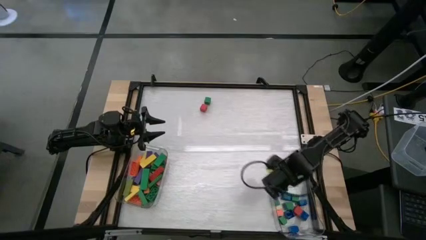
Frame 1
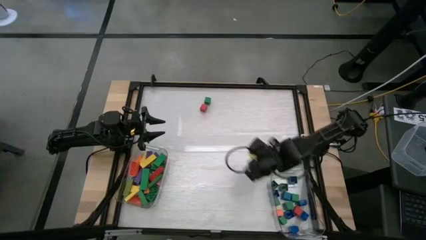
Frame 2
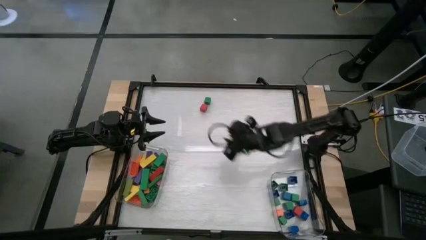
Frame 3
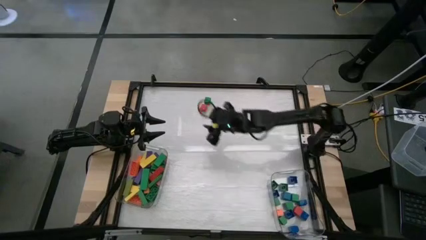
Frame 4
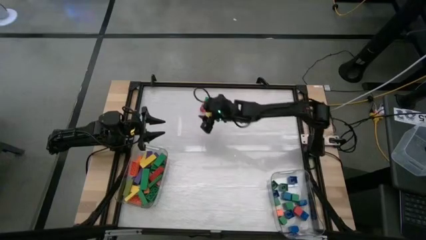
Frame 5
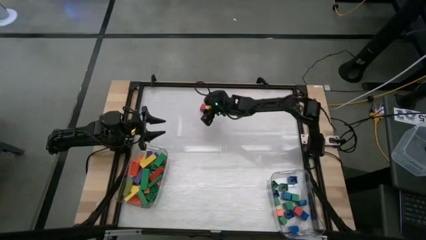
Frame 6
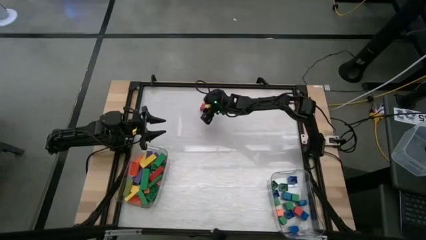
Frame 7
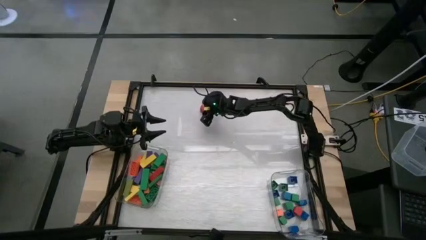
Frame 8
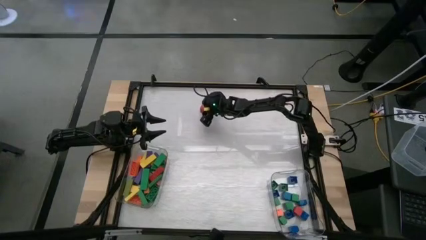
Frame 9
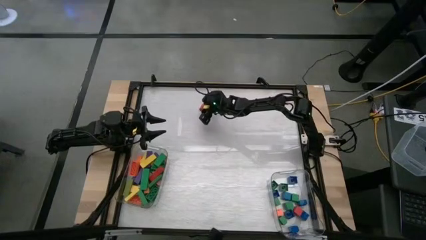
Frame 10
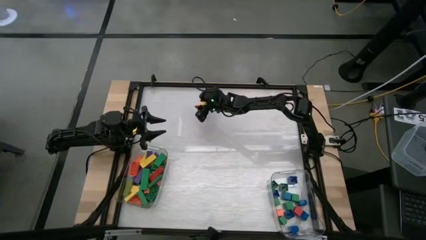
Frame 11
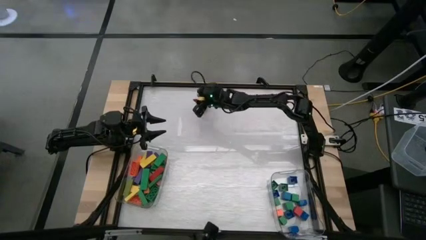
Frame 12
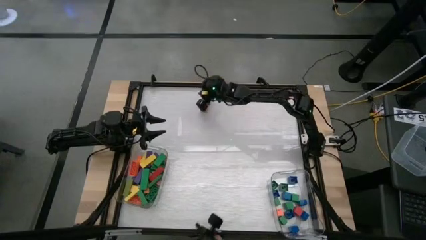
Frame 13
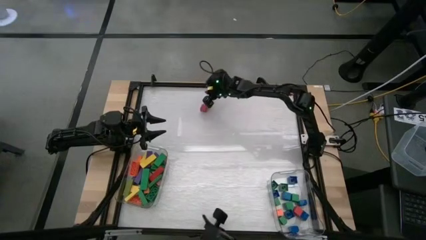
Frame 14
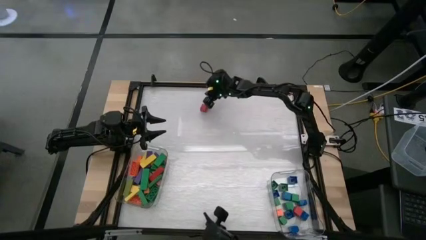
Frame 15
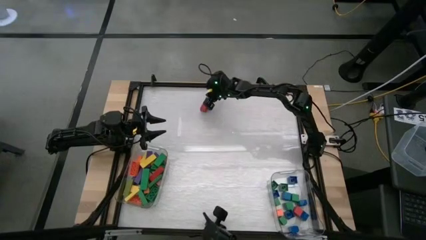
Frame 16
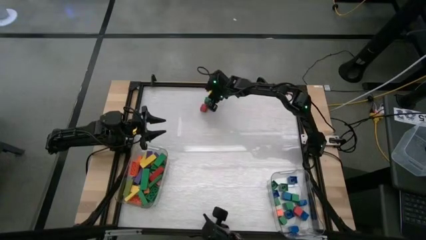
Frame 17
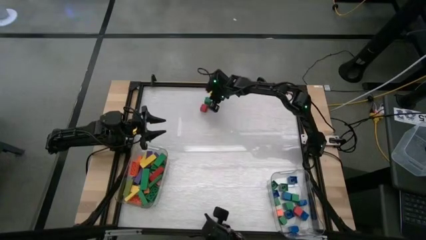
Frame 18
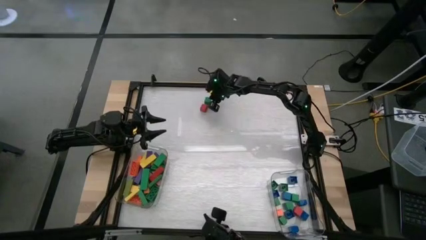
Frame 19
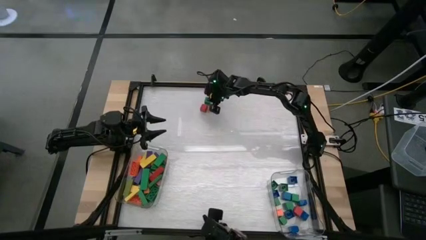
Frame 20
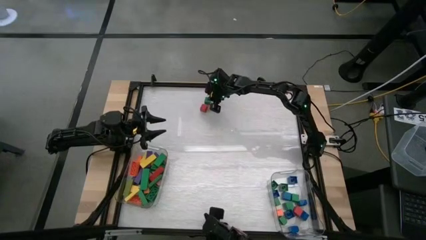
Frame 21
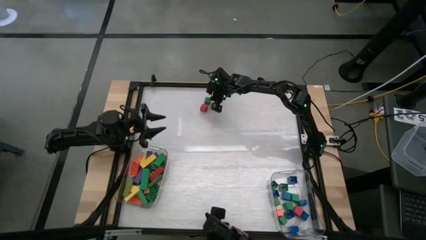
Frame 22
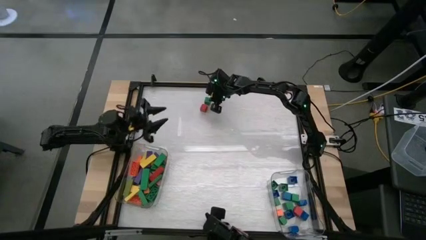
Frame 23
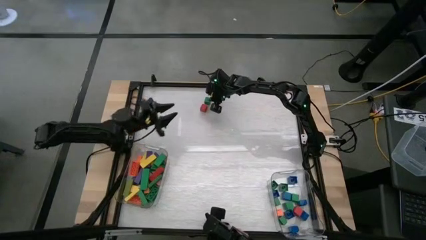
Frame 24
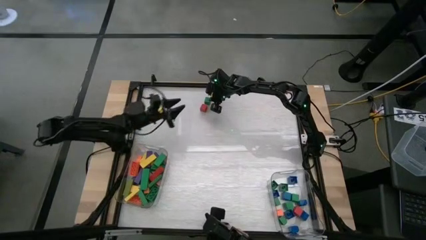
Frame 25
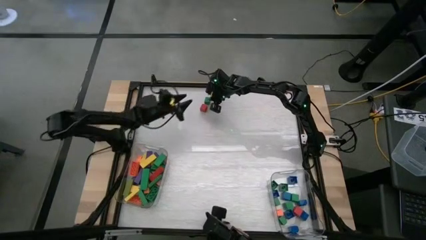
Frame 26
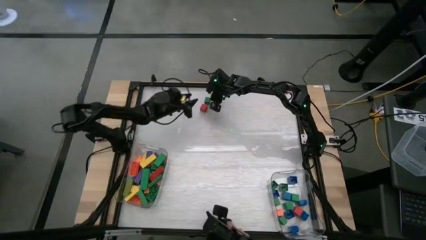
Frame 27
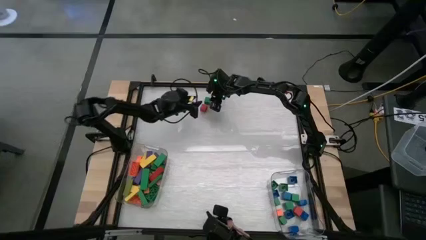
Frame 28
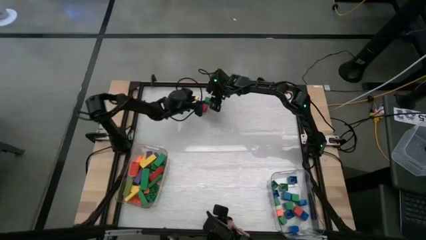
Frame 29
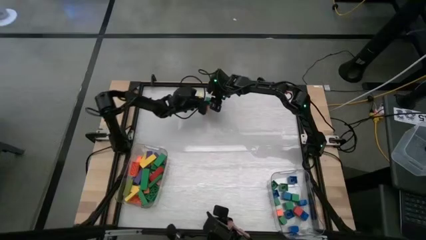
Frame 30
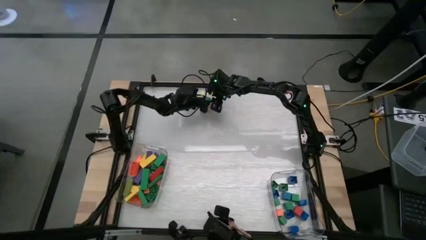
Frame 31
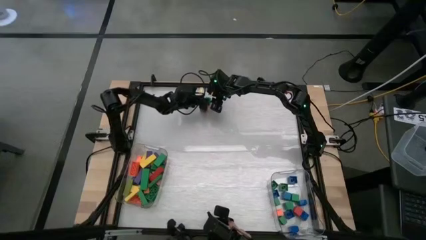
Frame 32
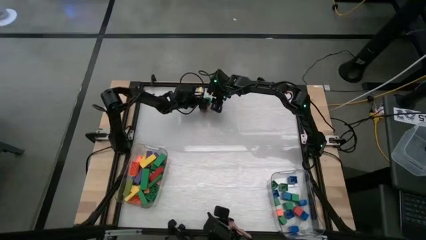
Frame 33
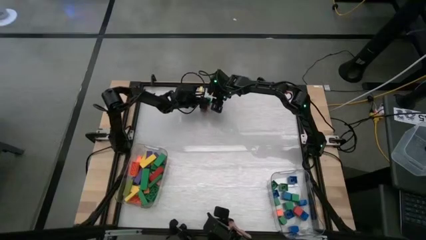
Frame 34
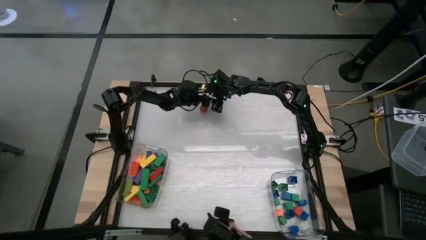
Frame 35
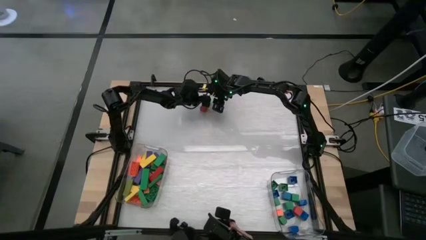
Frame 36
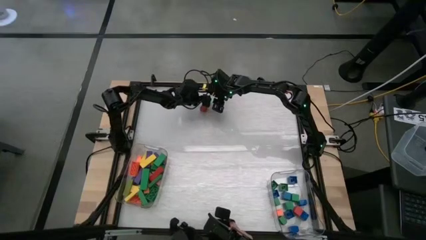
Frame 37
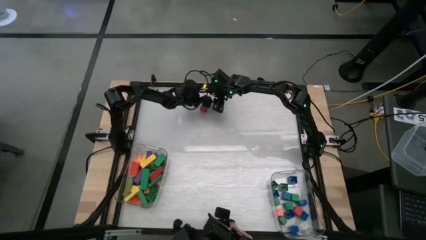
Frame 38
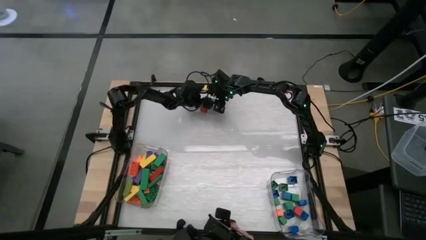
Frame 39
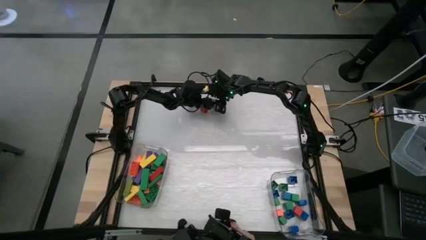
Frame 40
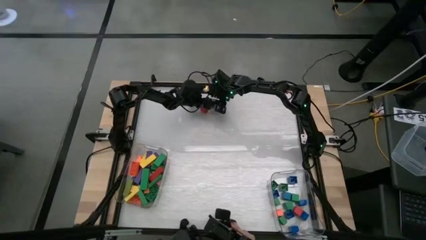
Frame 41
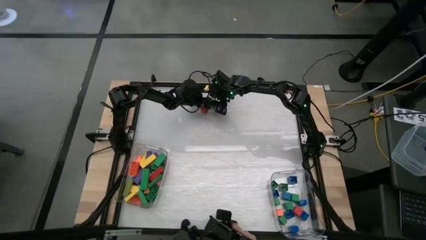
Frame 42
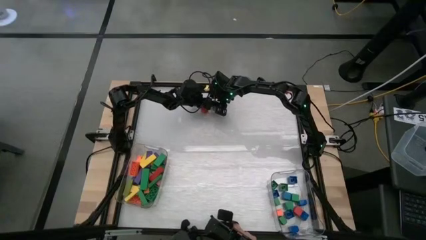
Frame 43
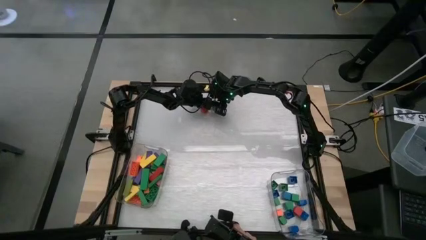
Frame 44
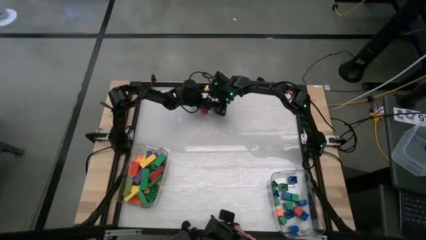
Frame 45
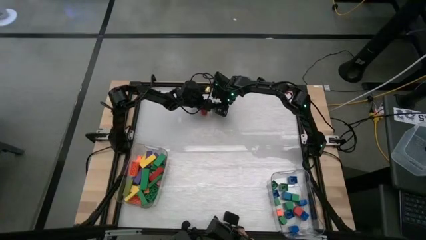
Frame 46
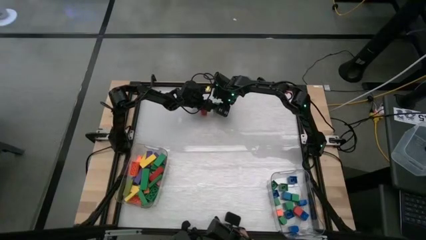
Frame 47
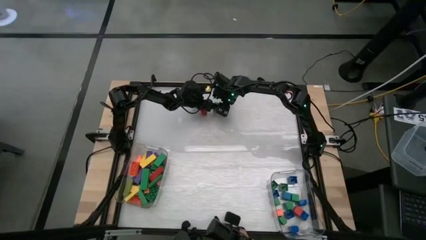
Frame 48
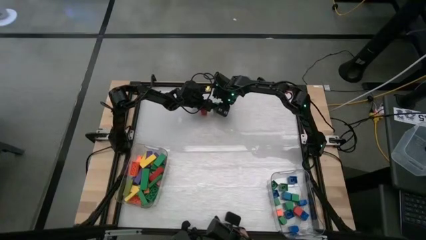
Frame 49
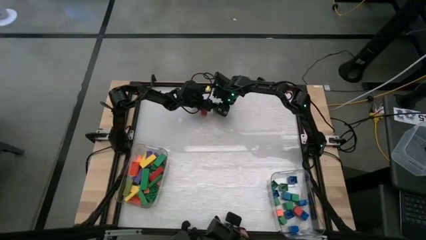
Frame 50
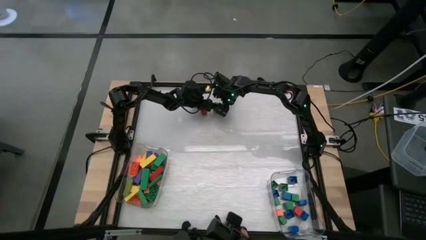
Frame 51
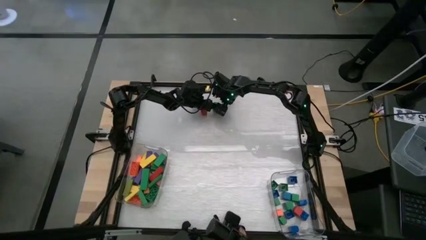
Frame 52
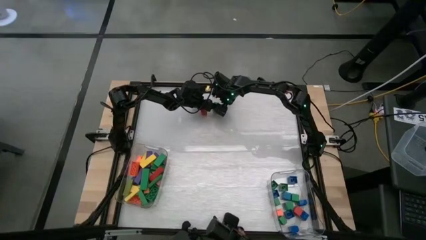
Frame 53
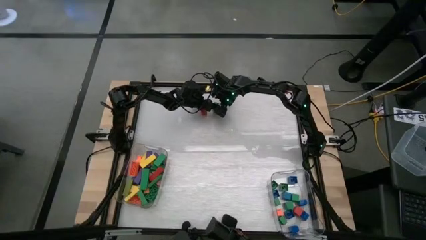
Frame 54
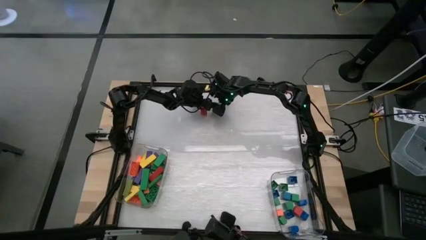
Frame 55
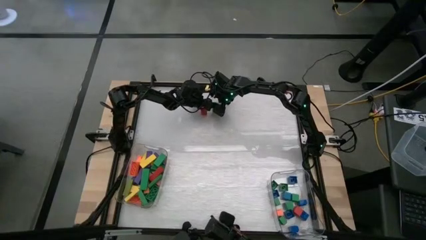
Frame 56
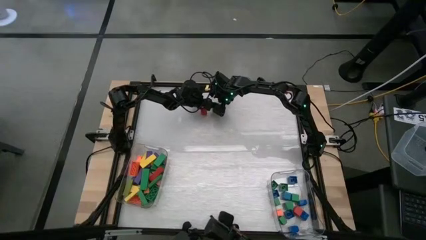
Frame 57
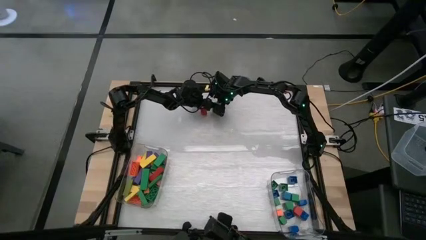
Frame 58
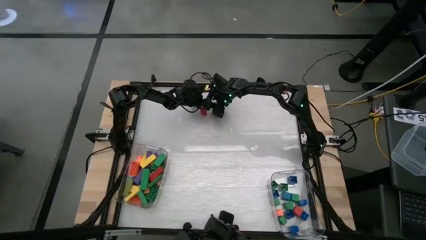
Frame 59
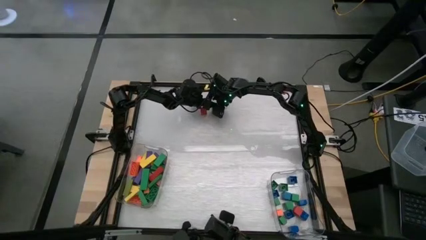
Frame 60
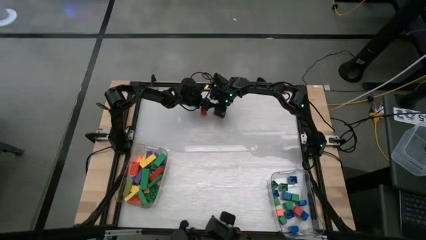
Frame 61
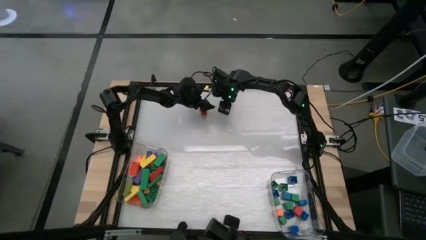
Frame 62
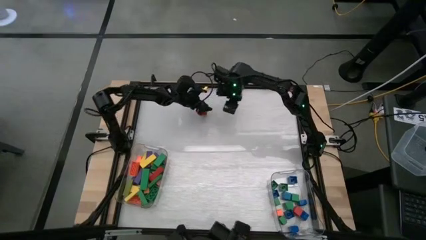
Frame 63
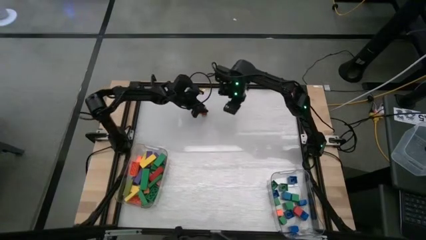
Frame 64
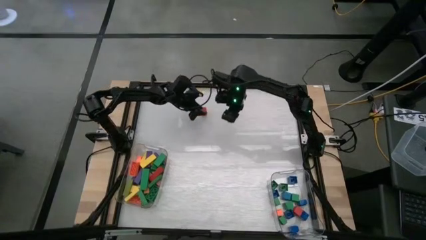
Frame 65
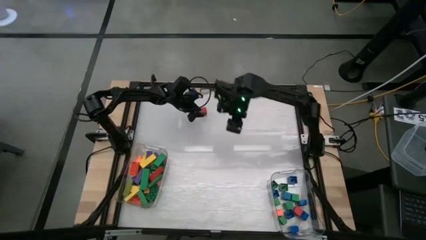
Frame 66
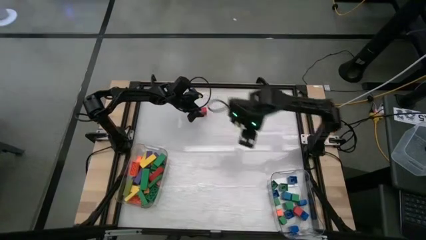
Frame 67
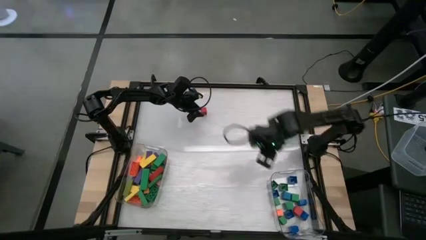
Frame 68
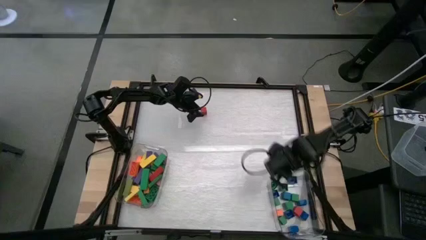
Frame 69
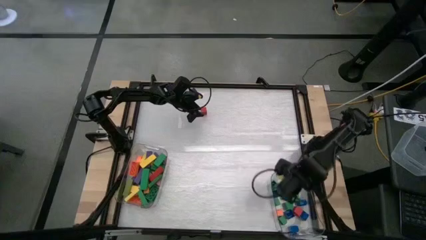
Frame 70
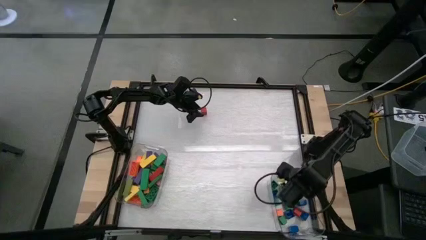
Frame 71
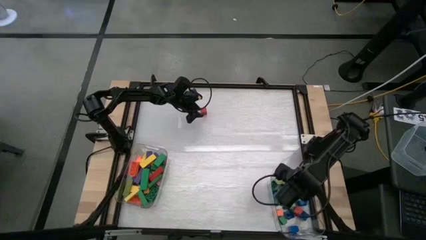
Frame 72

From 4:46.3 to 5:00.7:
Task: Sort blocks by size
Put the small green wooden block into the right transparent bin

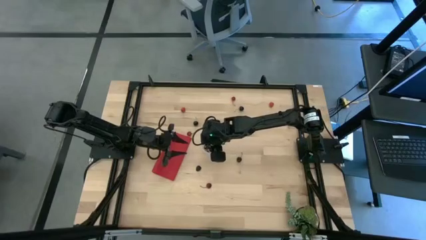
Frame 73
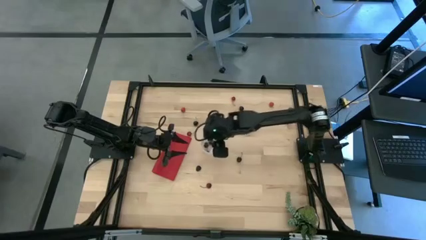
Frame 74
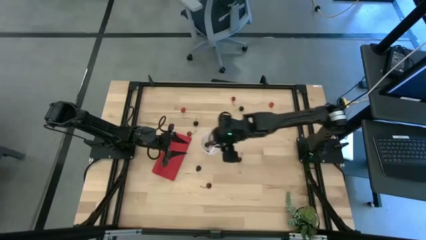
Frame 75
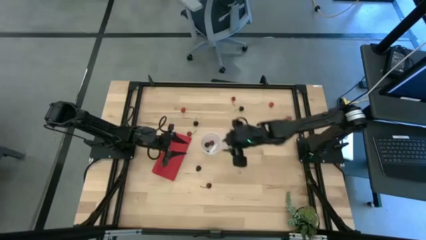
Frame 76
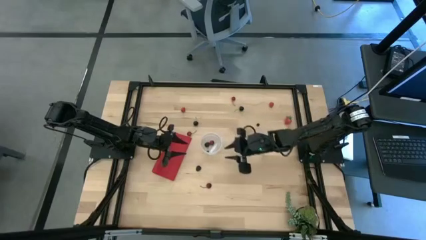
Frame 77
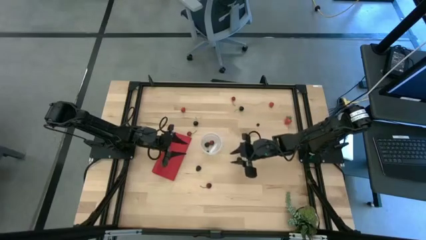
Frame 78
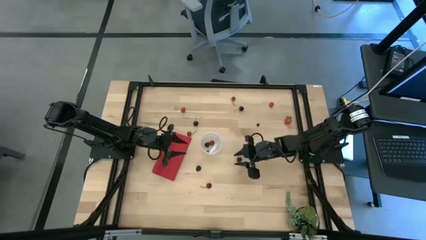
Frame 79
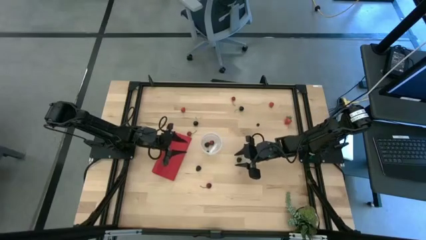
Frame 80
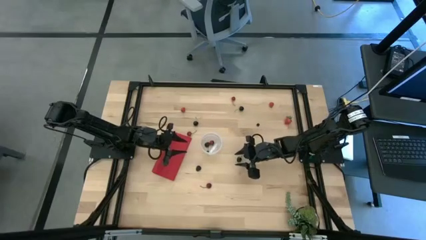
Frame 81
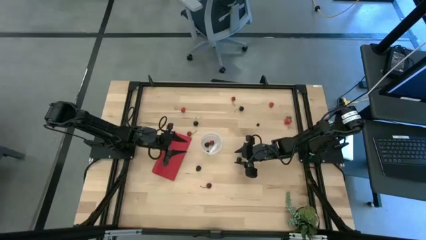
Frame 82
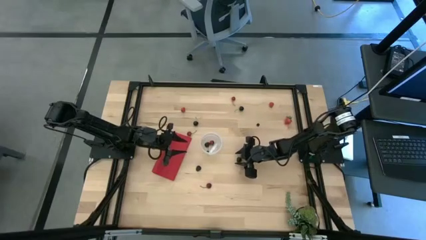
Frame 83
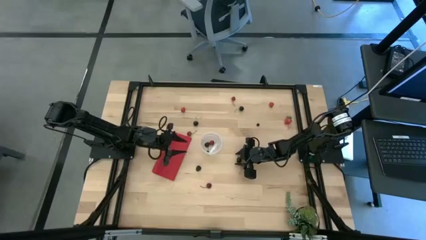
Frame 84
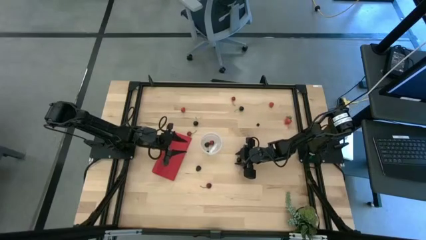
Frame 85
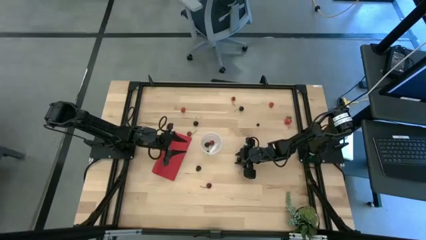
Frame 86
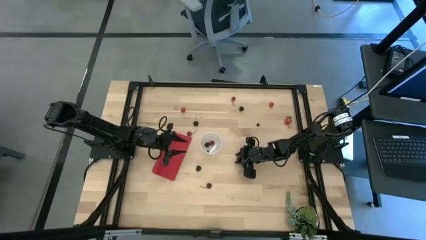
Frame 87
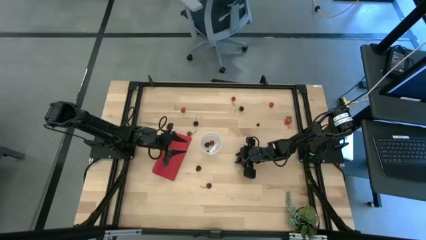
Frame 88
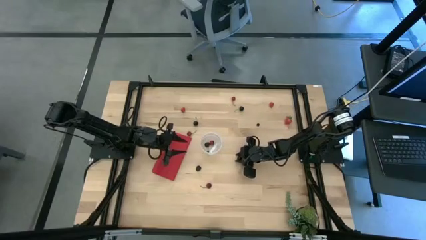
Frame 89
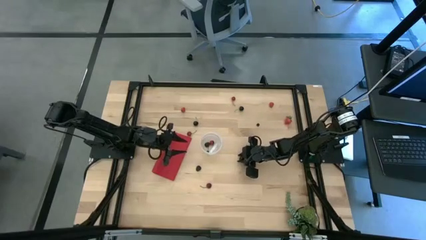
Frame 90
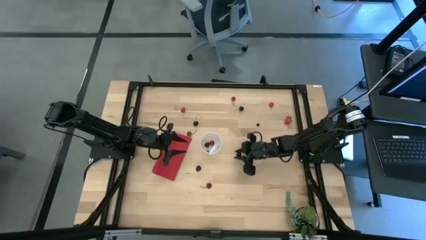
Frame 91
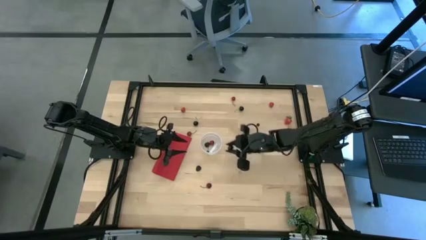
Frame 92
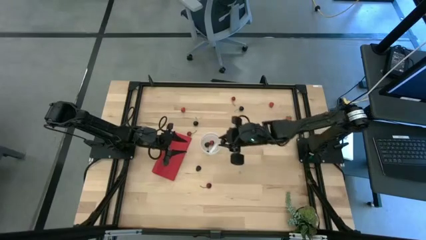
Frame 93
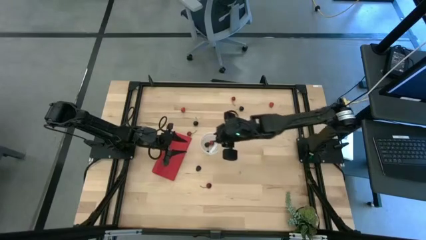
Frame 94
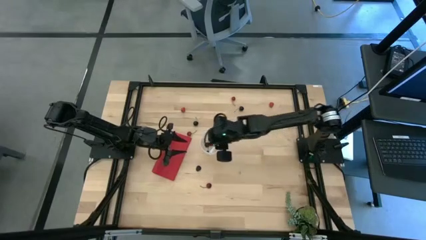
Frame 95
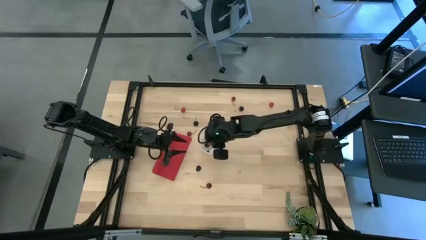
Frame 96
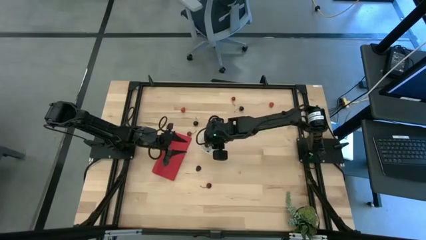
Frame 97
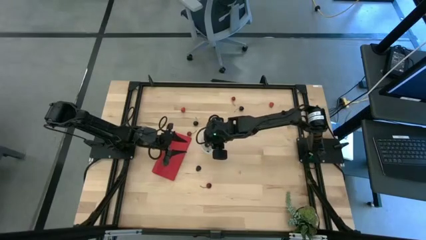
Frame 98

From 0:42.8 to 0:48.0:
Task: Pick and placing Produce into tupperware
Put the black cherries into the transparent bin
